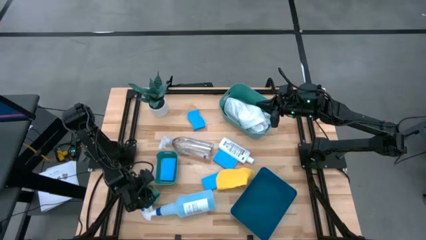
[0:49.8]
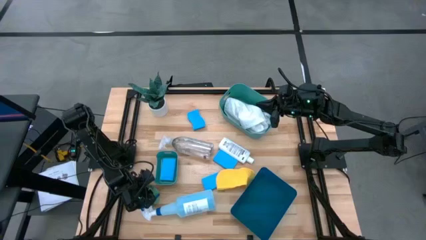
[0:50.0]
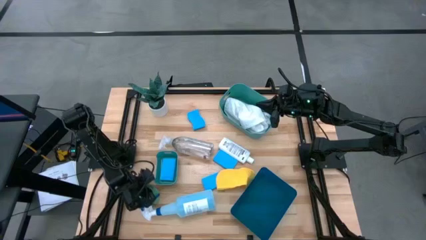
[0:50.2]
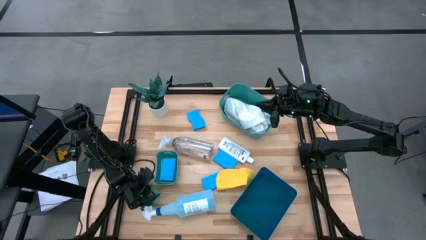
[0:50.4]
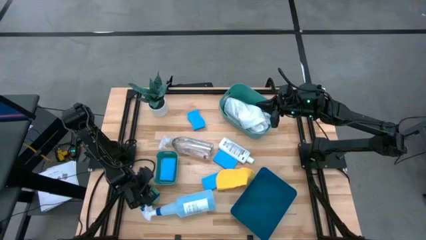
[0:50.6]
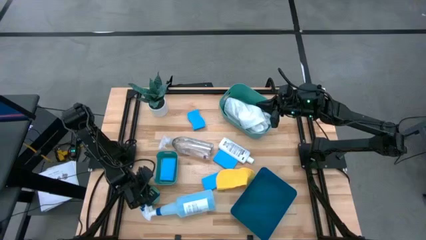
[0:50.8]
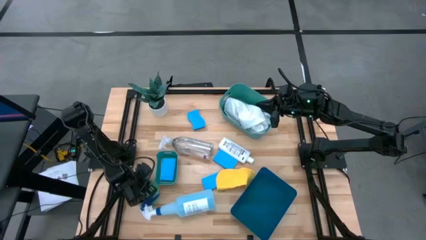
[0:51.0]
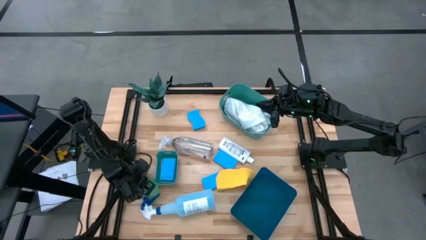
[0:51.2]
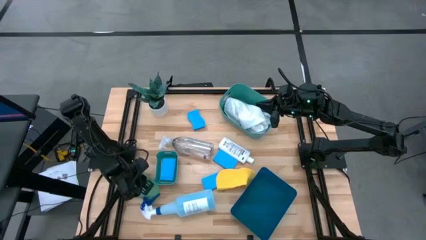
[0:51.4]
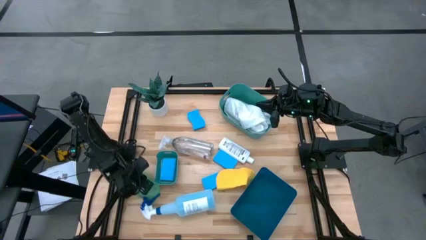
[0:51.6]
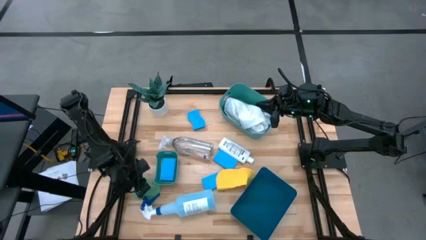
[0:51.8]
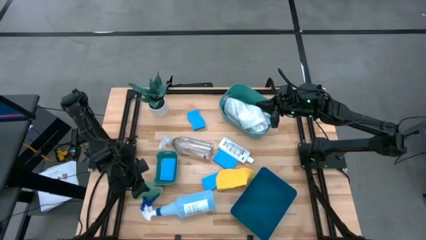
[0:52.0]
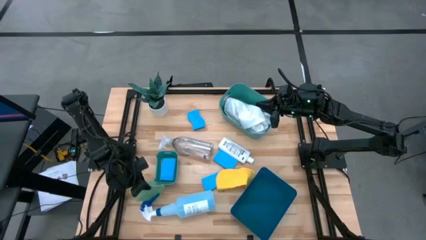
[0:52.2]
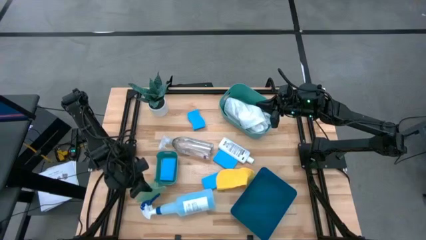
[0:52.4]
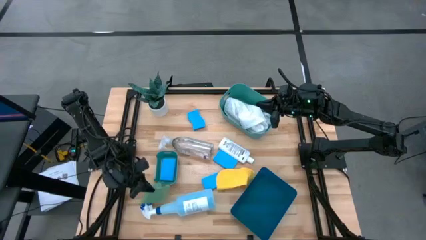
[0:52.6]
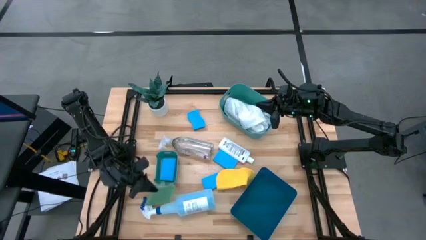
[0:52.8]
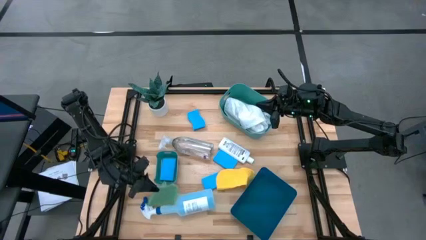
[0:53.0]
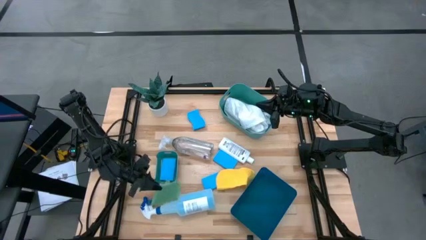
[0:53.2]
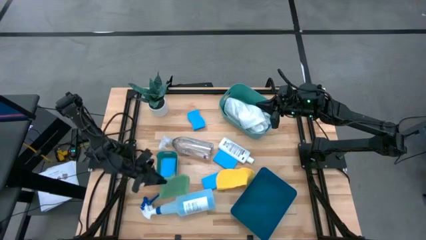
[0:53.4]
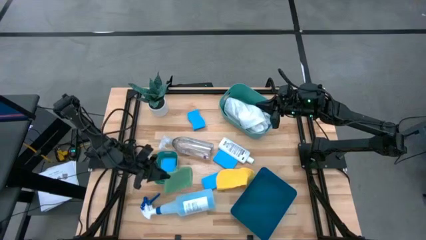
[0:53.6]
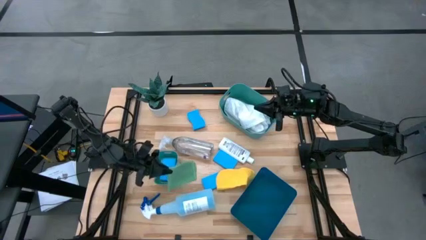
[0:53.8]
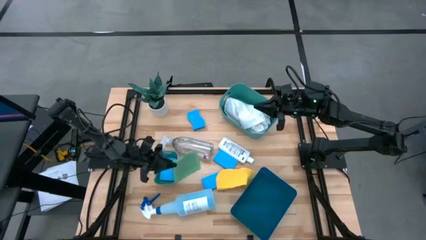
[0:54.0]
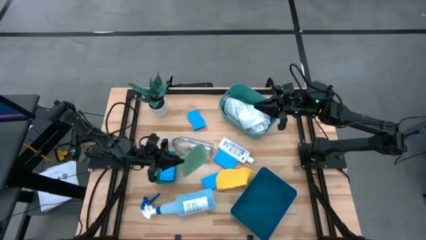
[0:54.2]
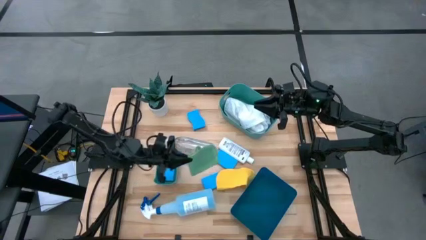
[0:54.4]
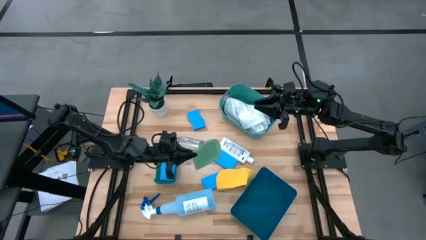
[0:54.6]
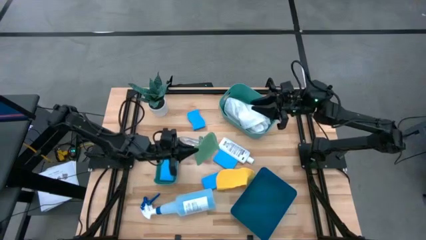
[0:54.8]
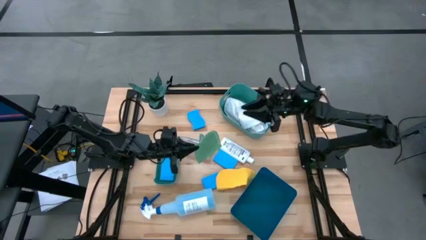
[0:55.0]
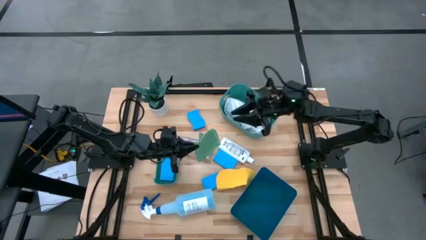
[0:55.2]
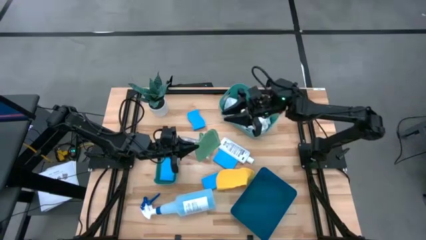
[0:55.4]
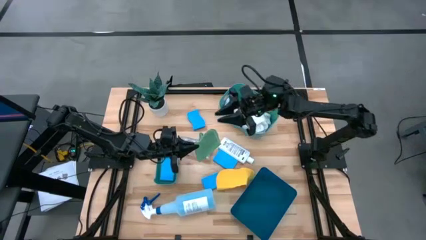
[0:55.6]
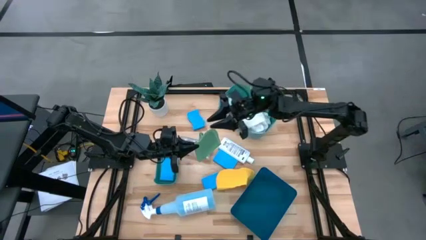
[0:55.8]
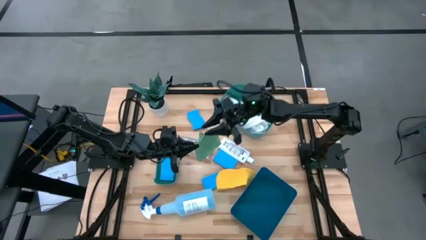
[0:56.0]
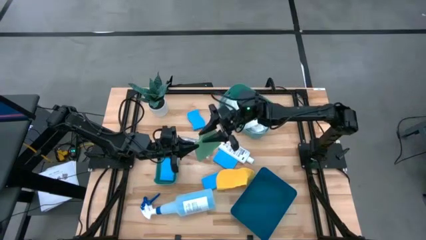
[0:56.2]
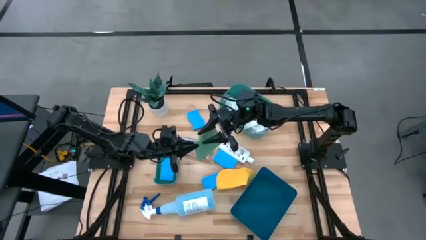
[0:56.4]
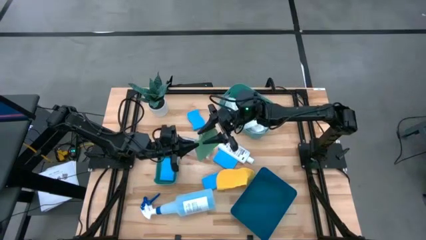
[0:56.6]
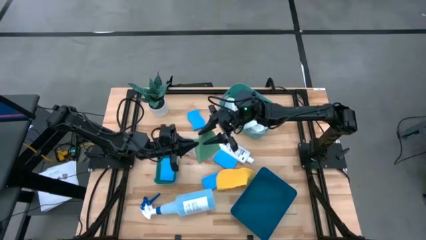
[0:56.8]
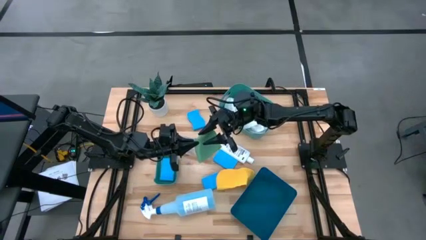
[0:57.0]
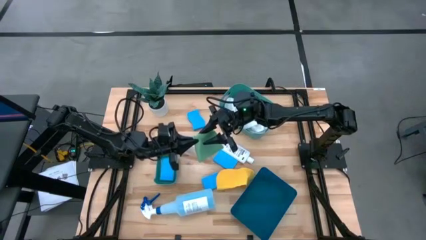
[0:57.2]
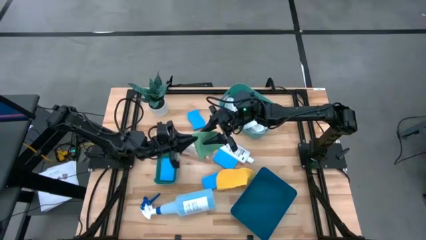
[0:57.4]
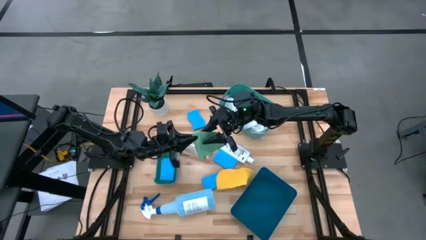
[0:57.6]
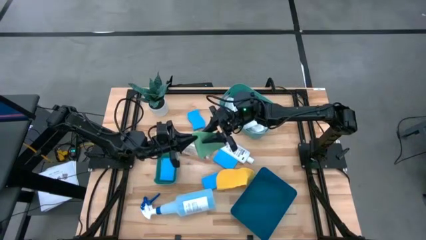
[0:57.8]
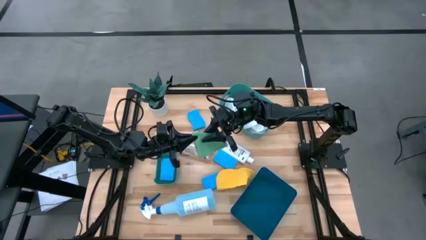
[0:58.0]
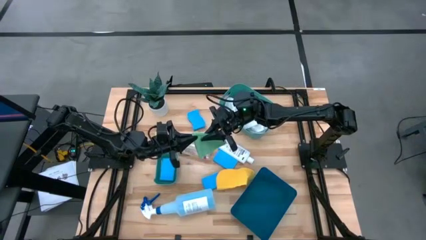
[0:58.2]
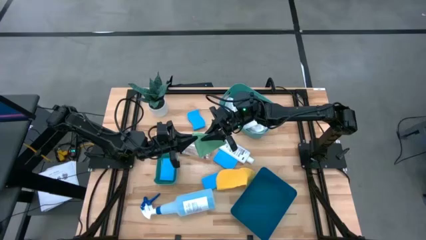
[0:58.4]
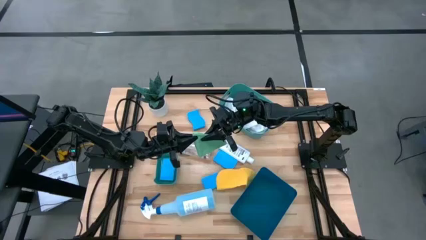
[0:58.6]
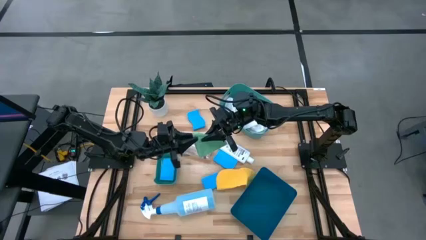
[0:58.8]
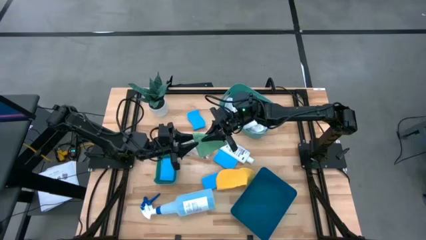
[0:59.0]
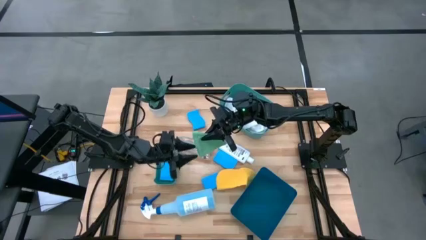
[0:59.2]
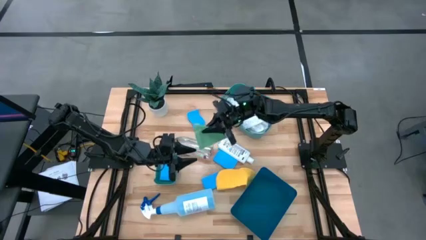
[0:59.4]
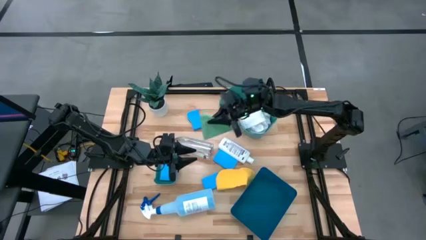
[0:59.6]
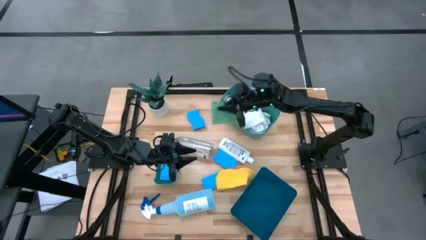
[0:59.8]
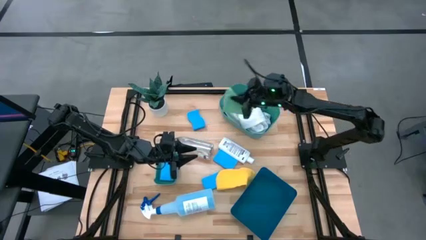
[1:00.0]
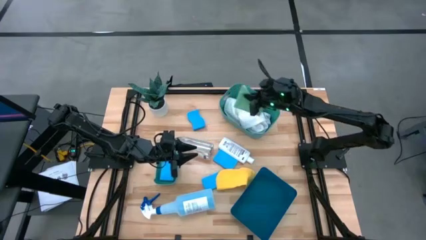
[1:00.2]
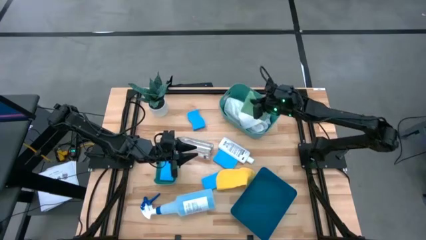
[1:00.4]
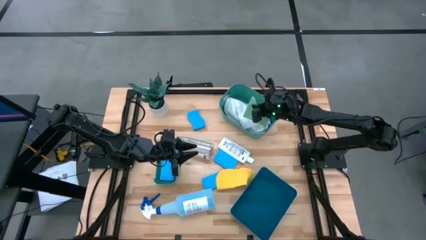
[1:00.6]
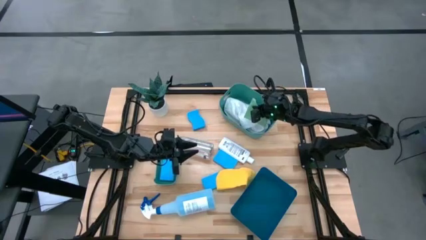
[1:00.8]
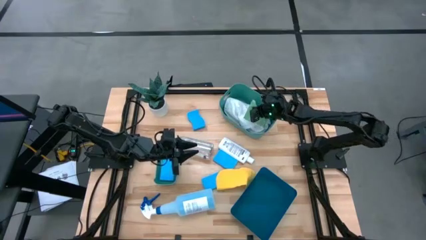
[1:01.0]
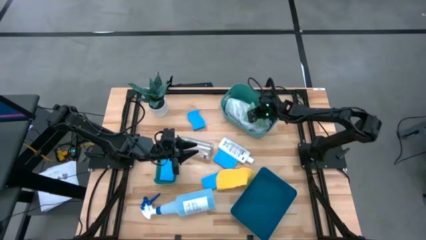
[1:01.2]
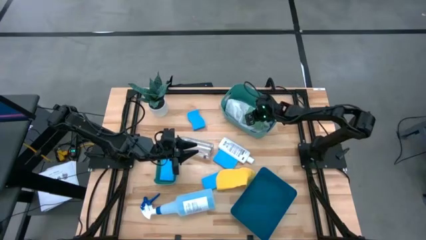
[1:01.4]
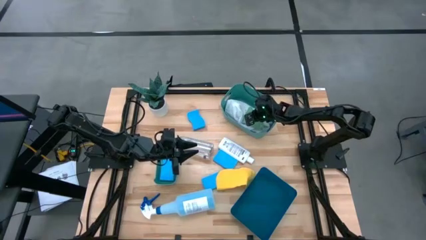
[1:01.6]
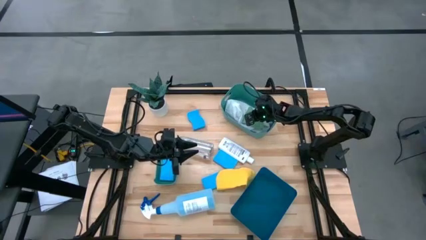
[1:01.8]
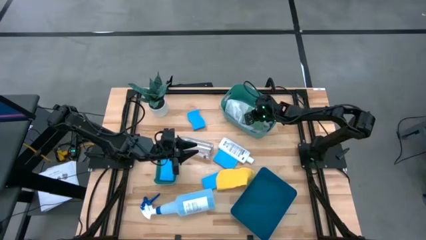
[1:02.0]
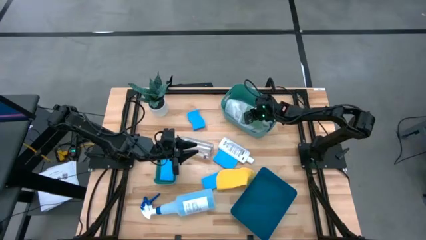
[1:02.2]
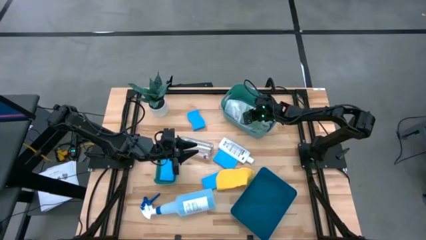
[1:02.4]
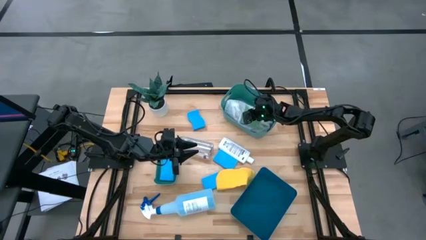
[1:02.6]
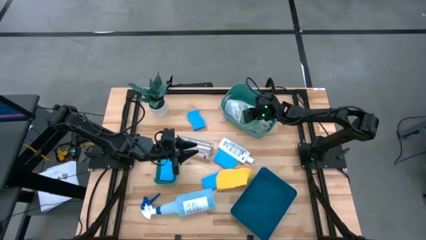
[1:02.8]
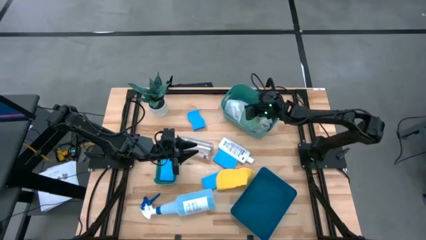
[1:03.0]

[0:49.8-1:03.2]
Task: Pick & Place Kitchen Items
Put the green towel into the big green bin
